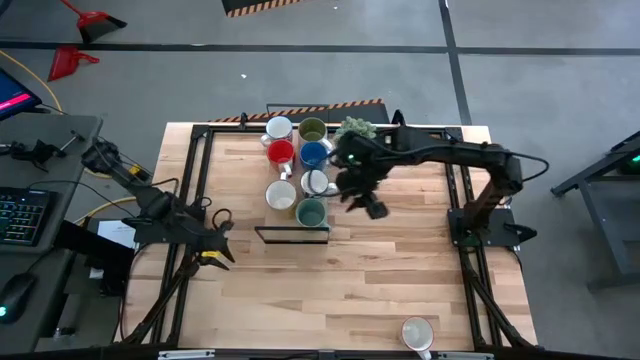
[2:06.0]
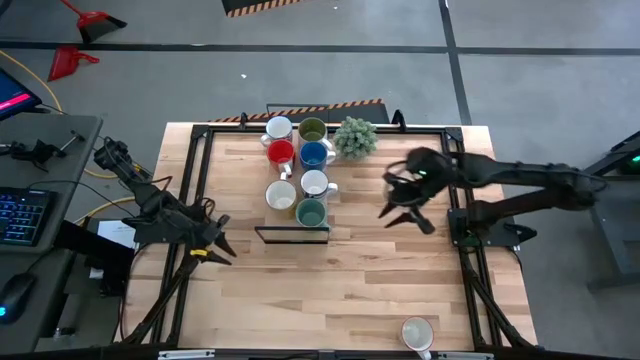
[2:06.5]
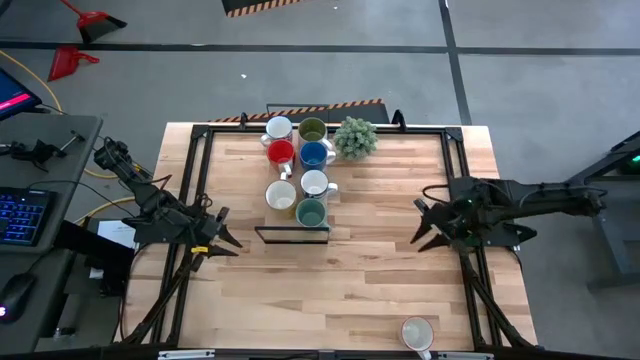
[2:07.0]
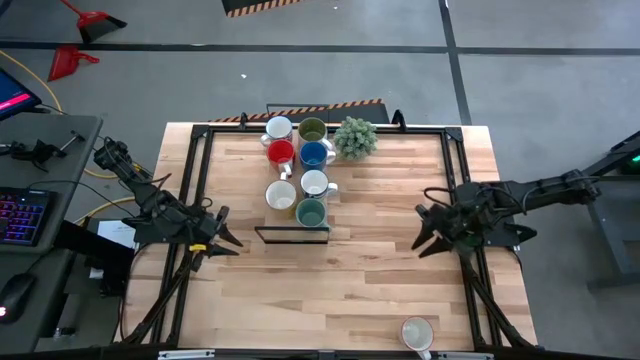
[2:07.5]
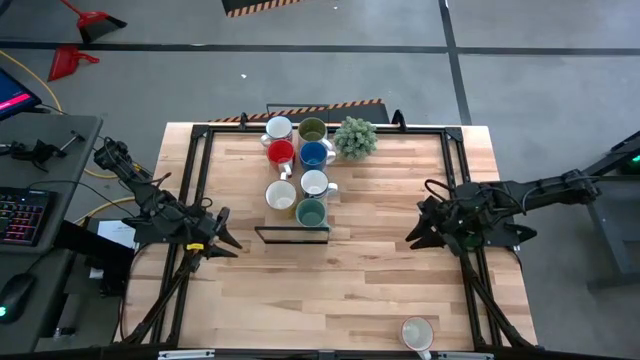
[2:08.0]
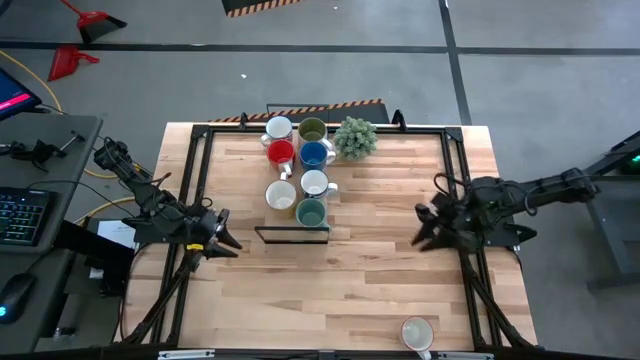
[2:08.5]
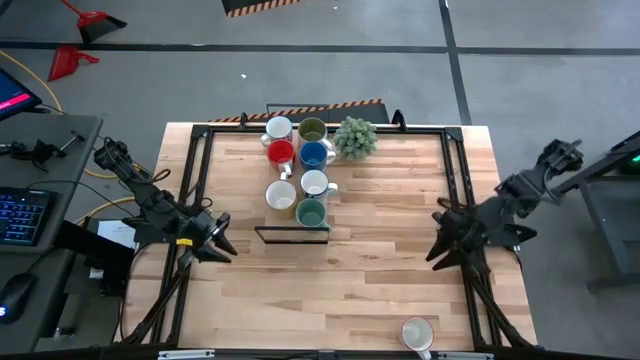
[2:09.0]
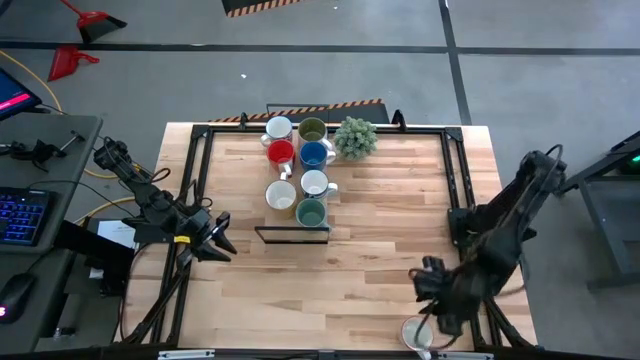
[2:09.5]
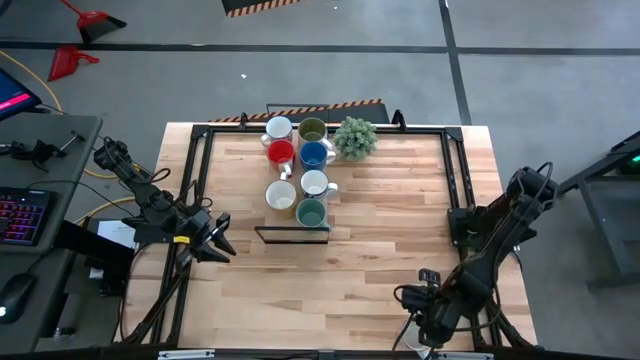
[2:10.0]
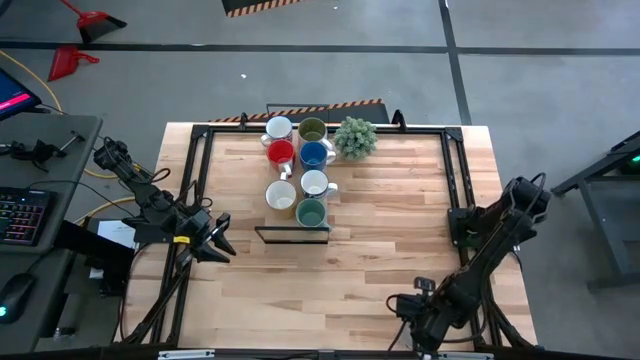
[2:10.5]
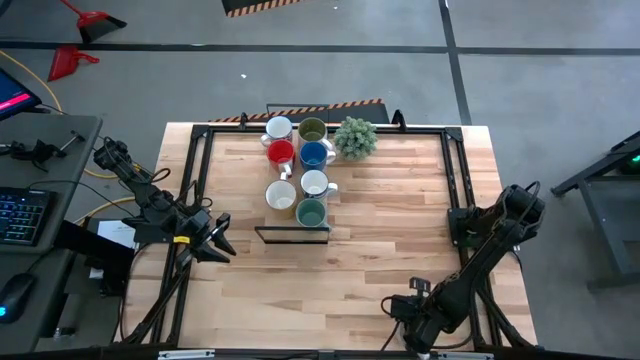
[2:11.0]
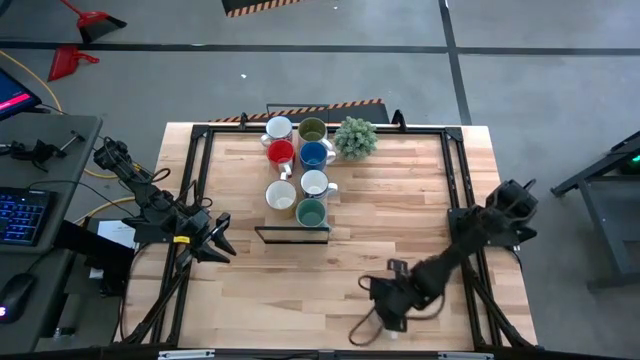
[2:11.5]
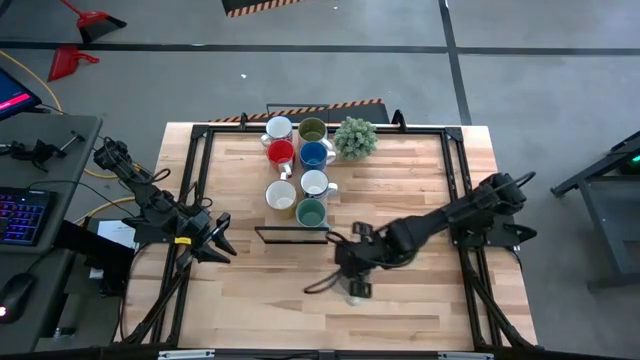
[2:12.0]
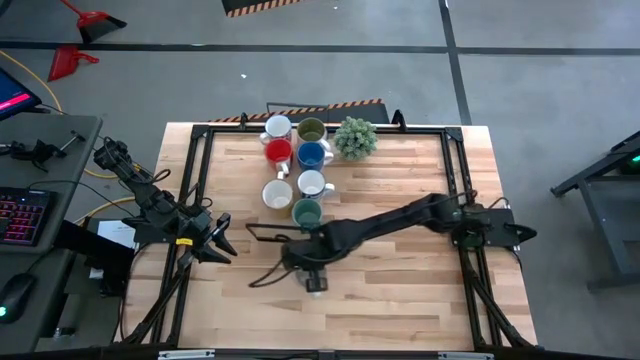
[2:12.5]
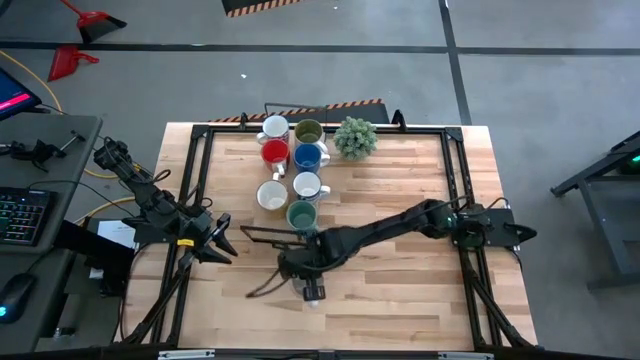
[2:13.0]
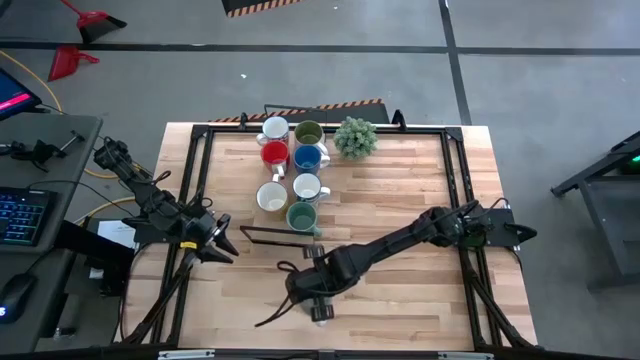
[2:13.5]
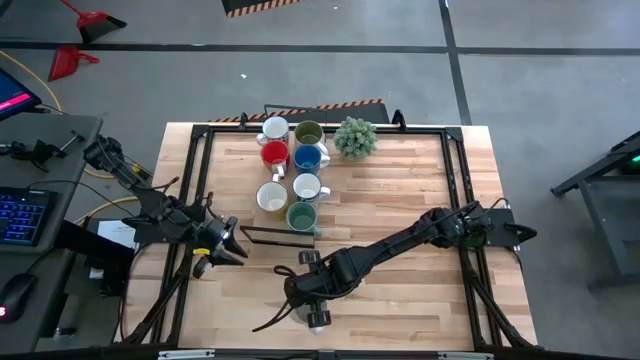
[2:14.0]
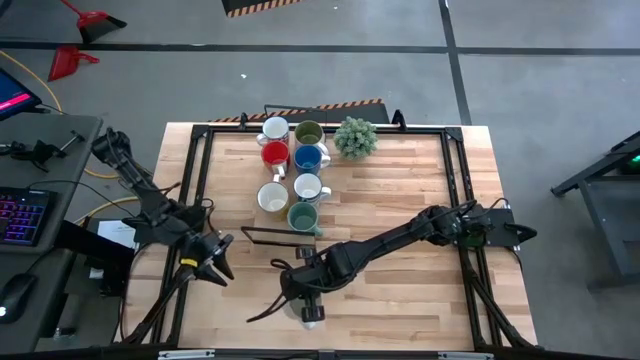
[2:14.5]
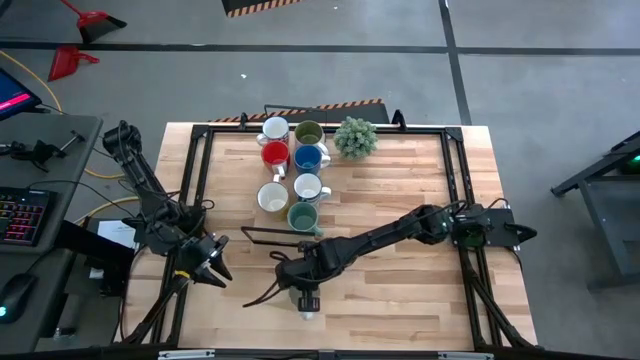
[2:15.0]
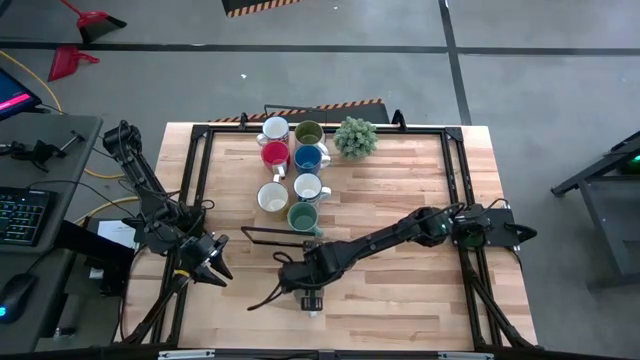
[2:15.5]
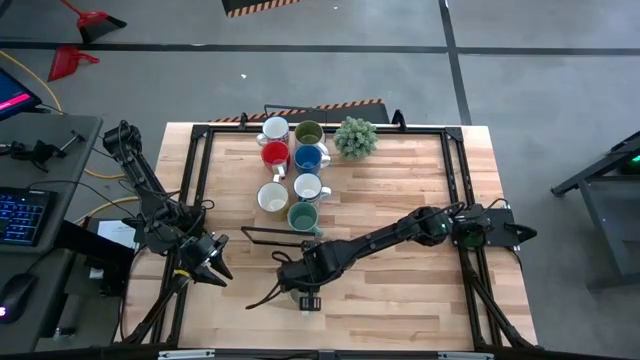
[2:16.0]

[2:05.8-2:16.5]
Task: Place coffee mugs
Move the gray patterned mug to the bottom middle of the table

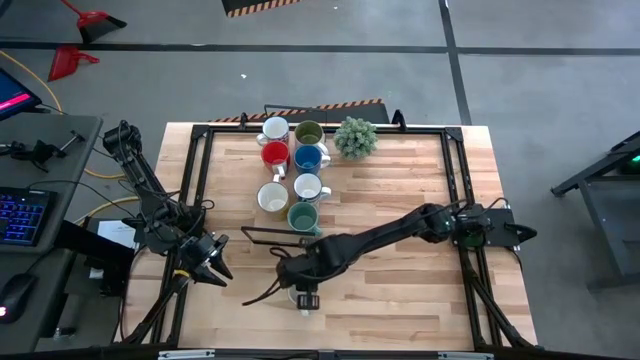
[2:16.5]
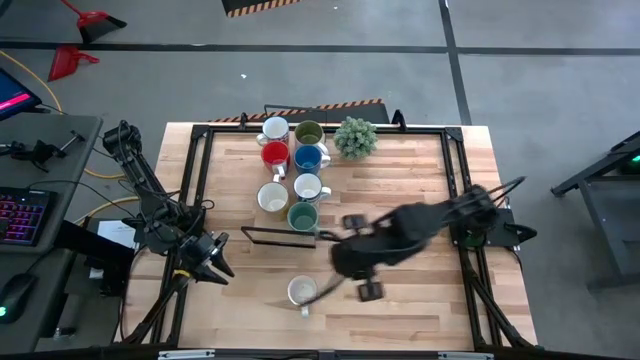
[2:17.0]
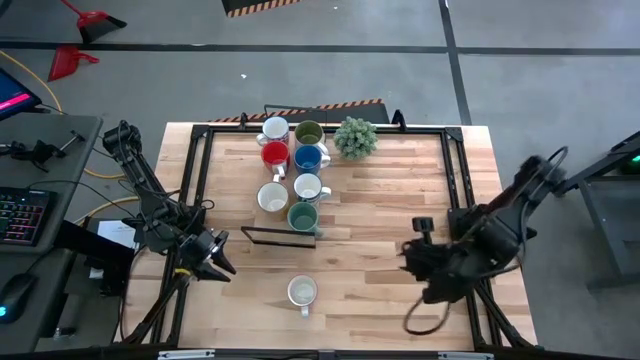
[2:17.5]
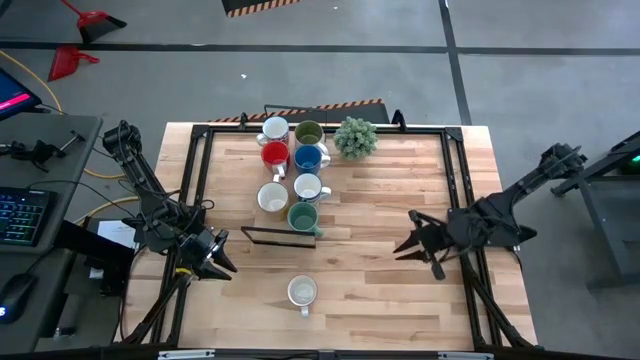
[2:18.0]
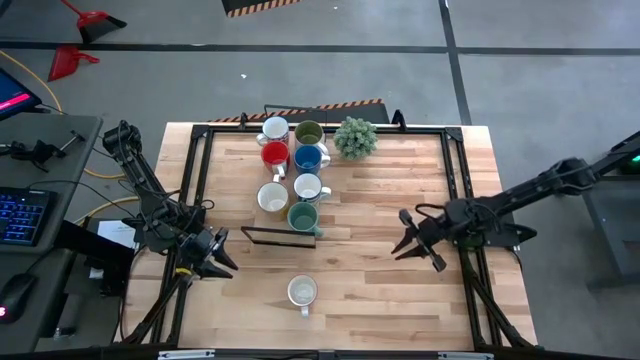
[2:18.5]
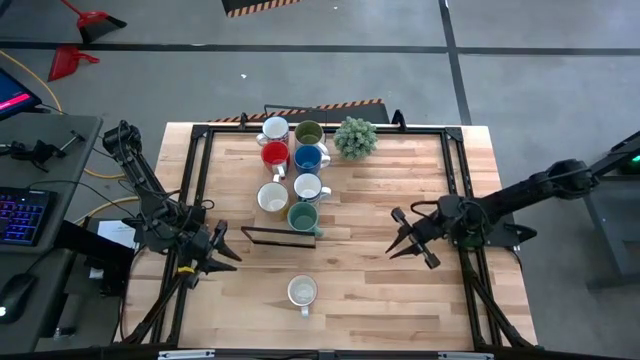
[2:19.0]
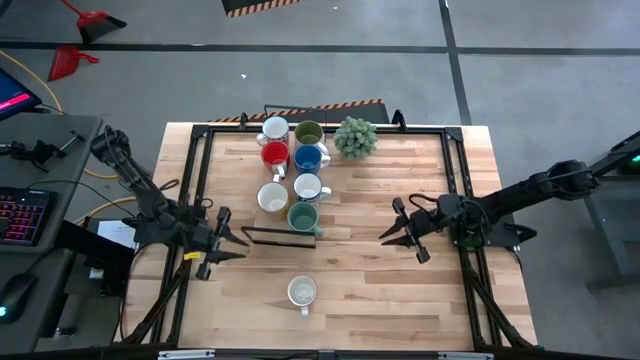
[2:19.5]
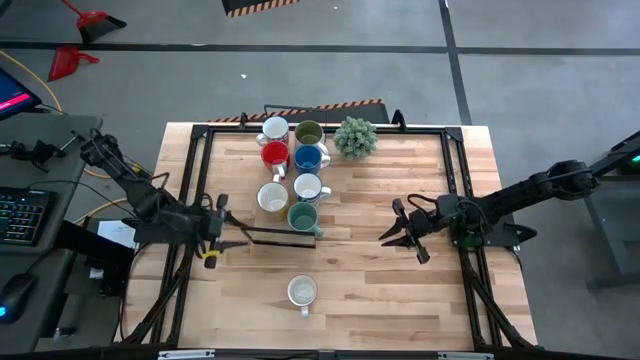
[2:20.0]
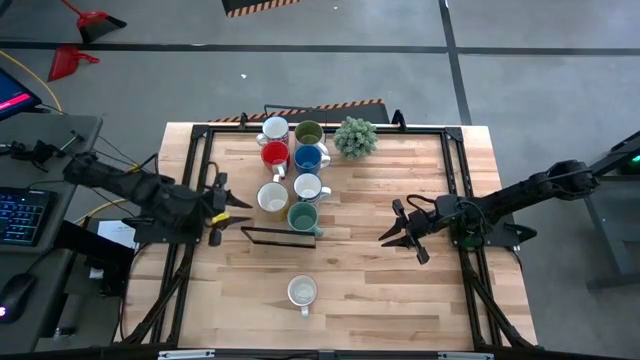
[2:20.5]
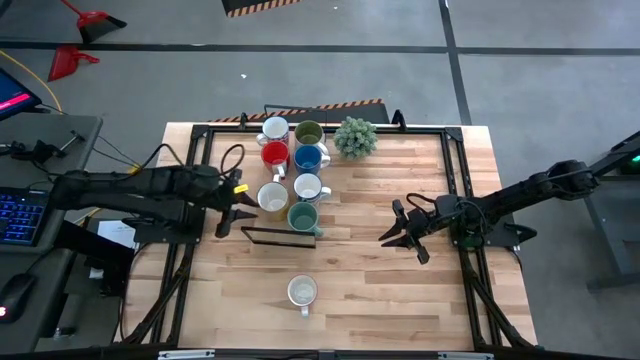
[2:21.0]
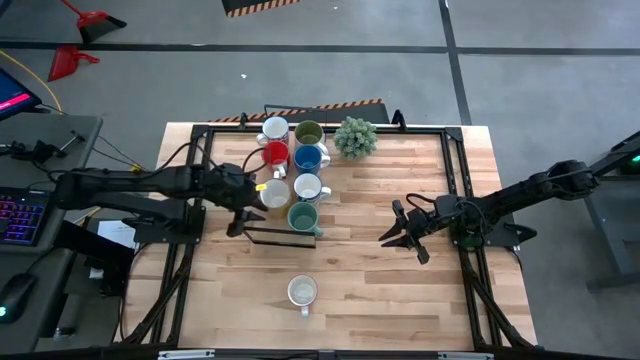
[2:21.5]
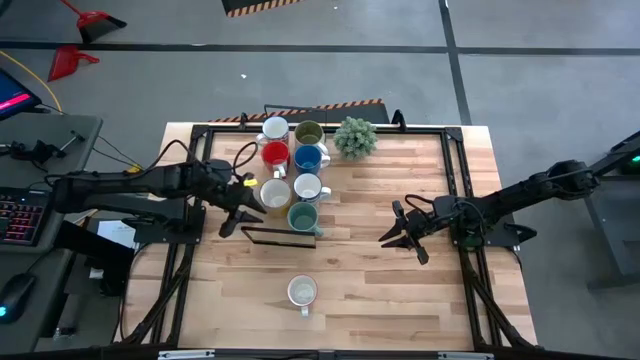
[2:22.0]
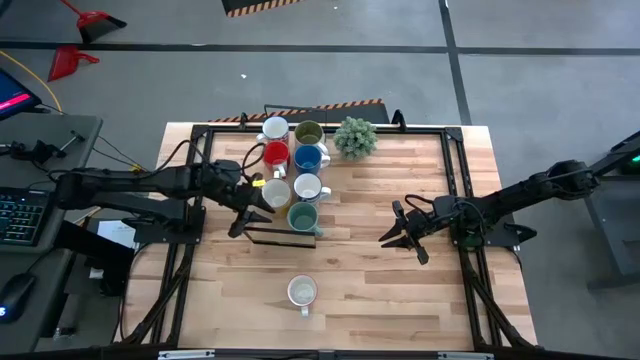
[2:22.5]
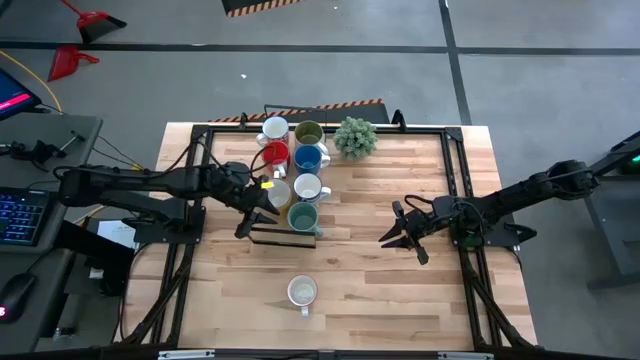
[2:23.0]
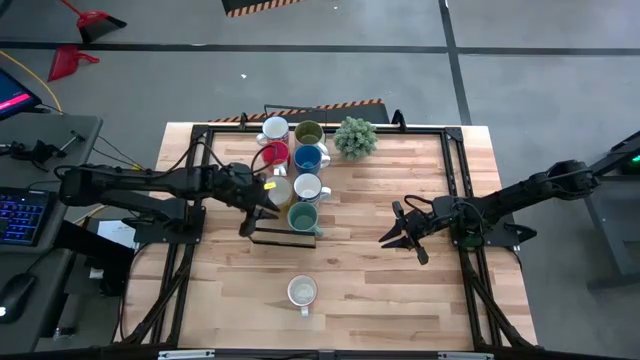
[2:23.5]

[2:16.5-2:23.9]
Adjust the yellow mug on the shelf

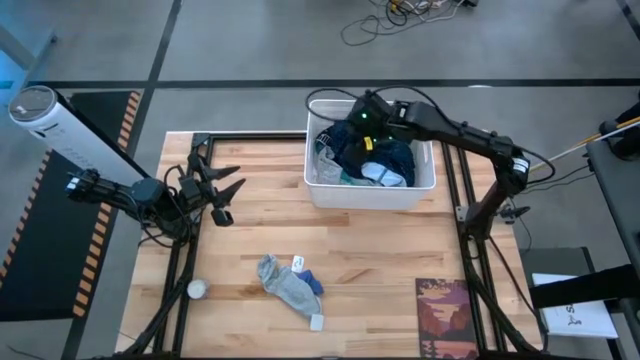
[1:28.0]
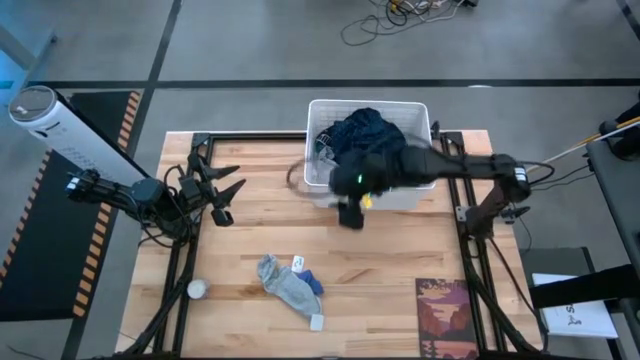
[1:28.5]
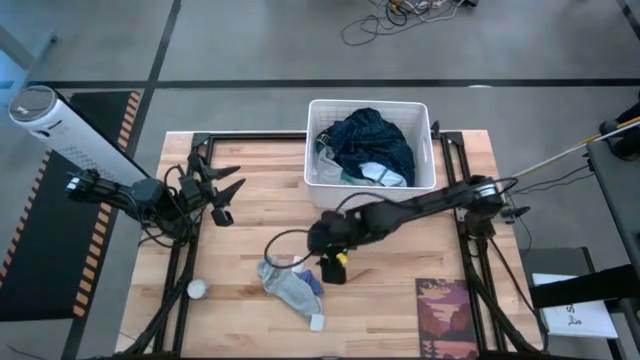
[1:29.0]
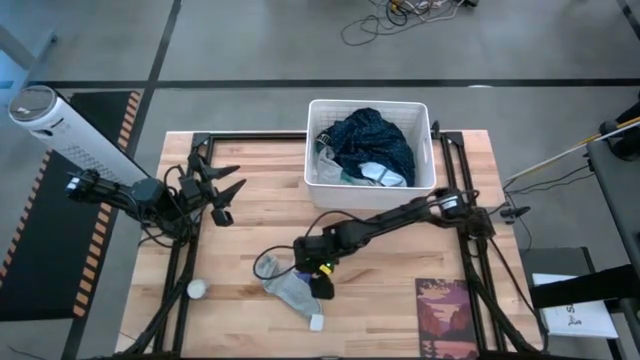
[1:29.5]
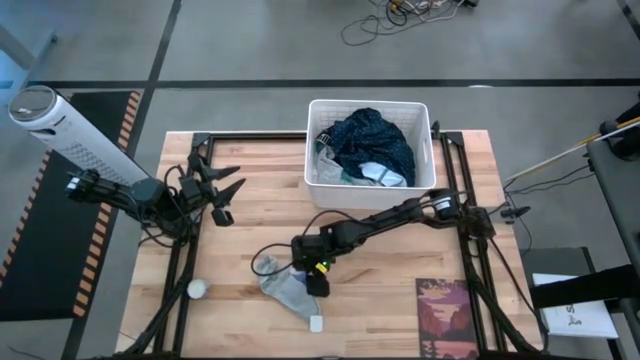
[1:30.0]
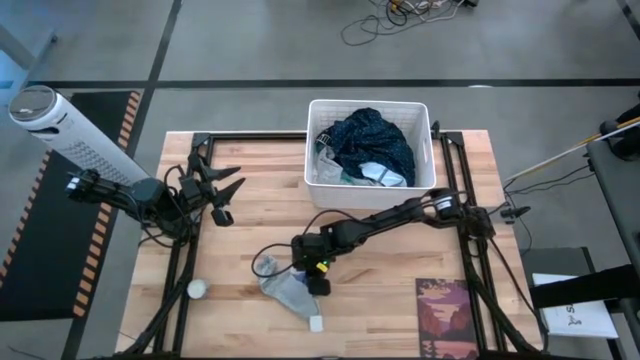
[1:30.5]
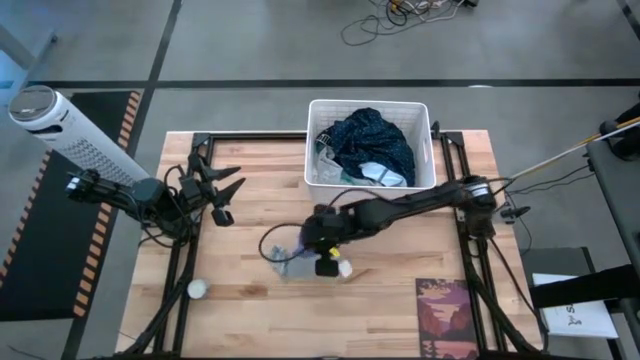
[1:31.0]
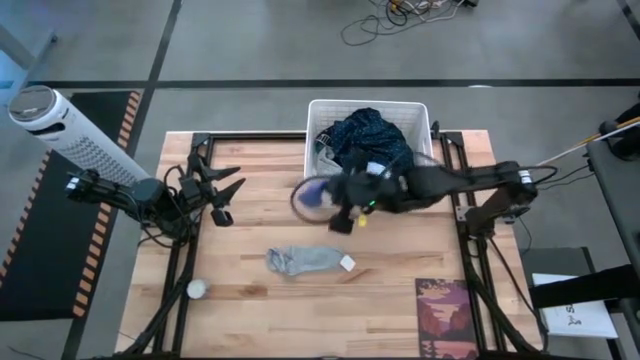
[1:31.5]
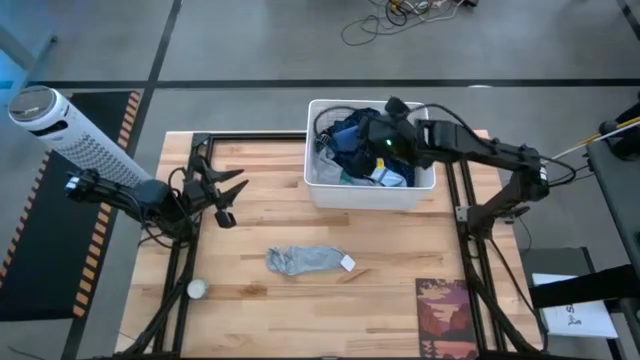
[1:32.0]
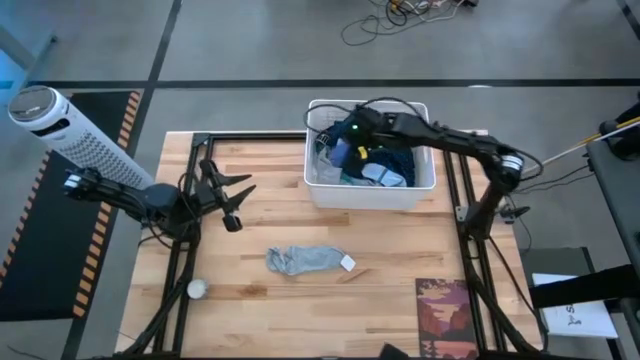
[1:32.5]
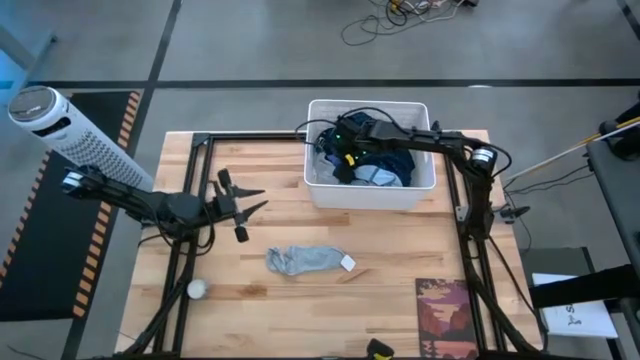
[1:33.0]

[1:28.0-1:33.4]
Task: Sort clothes
Put the violet sock into the white laundry bin
